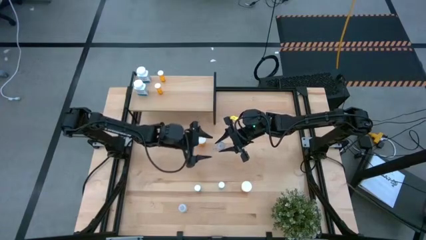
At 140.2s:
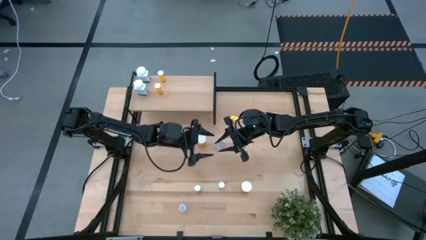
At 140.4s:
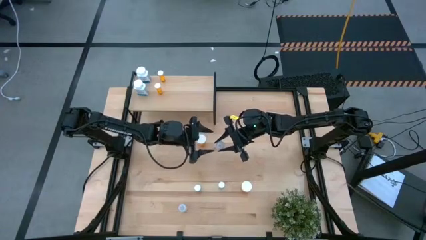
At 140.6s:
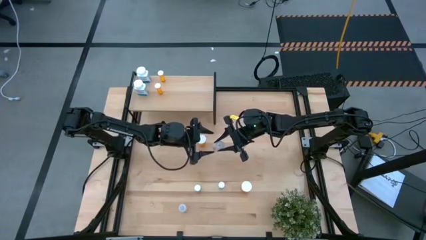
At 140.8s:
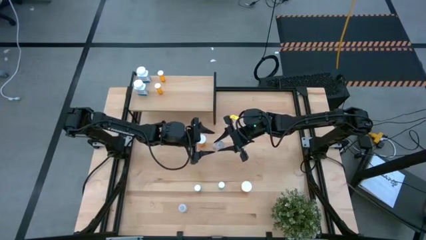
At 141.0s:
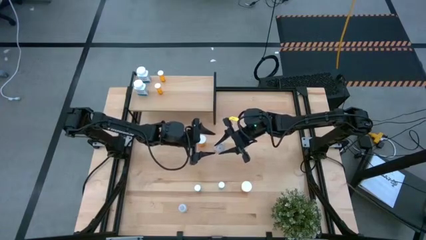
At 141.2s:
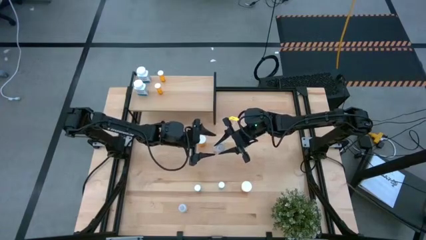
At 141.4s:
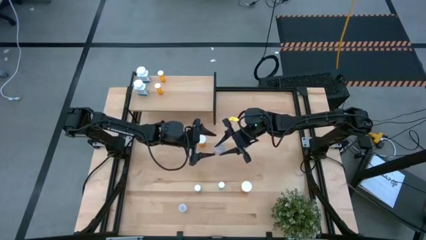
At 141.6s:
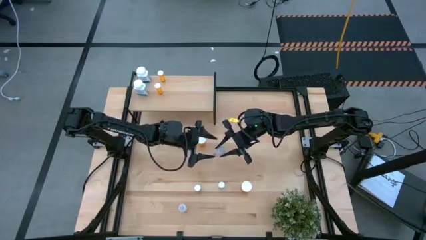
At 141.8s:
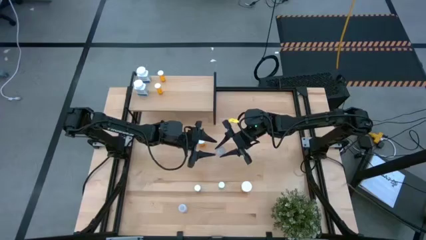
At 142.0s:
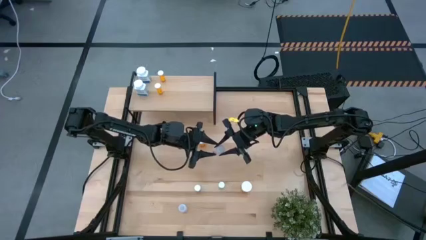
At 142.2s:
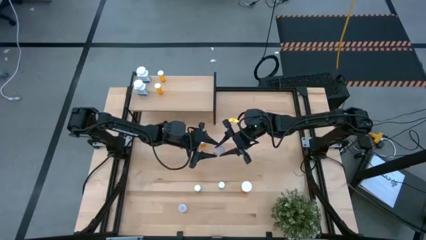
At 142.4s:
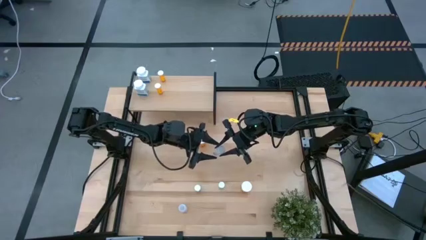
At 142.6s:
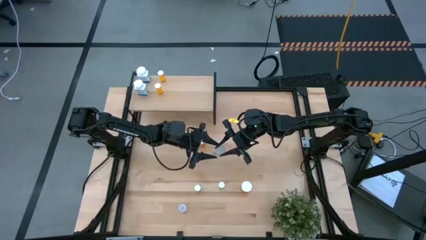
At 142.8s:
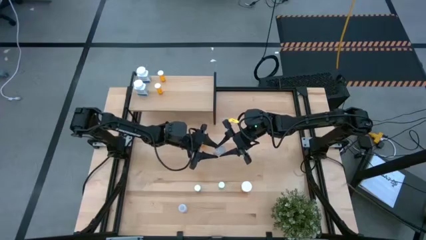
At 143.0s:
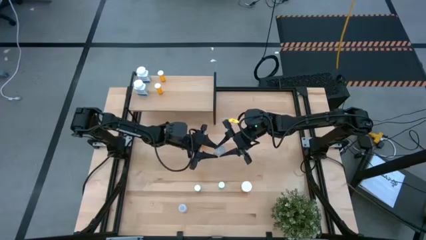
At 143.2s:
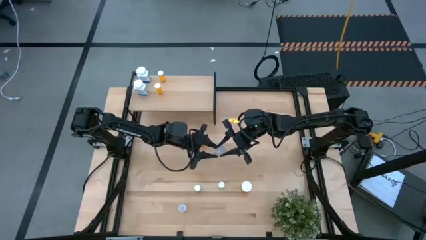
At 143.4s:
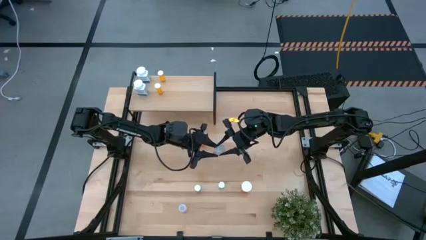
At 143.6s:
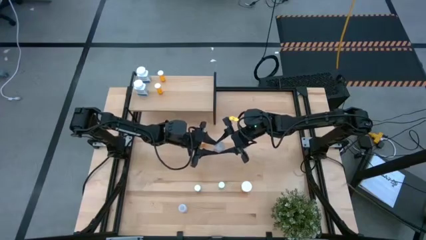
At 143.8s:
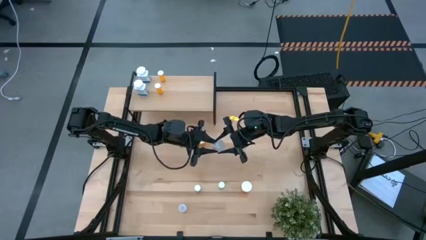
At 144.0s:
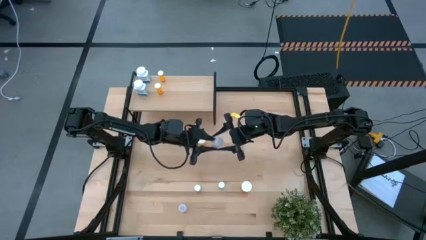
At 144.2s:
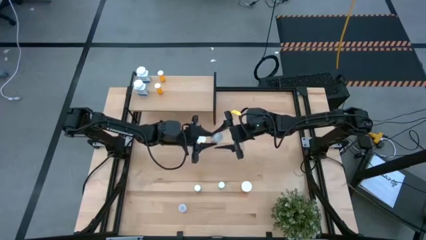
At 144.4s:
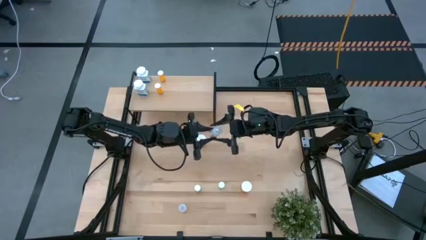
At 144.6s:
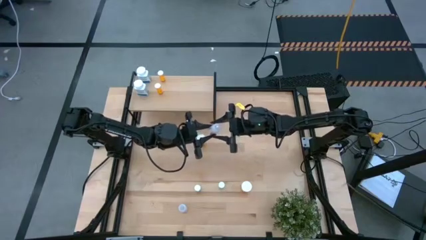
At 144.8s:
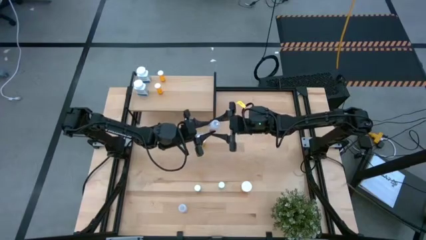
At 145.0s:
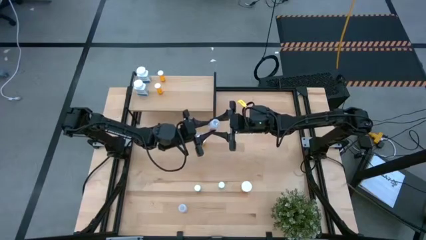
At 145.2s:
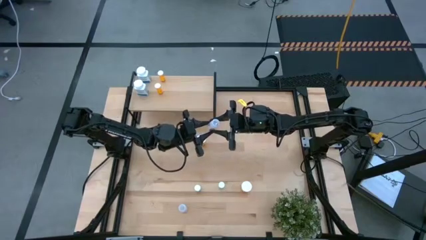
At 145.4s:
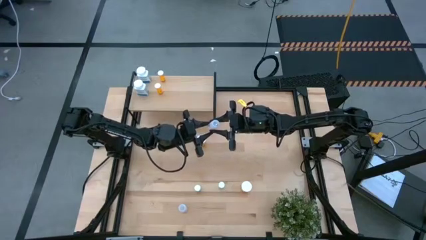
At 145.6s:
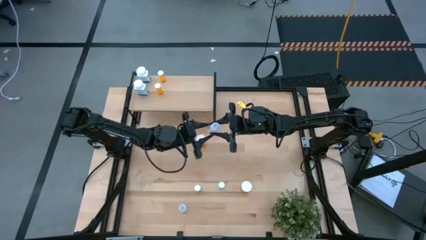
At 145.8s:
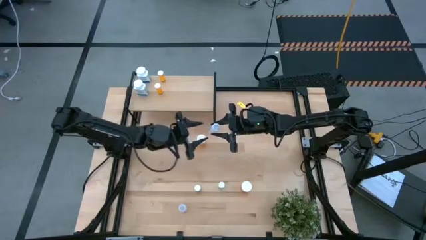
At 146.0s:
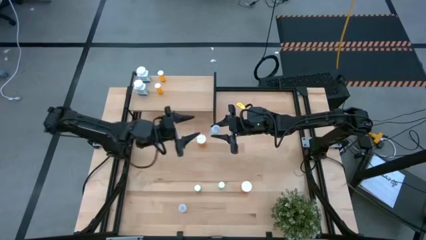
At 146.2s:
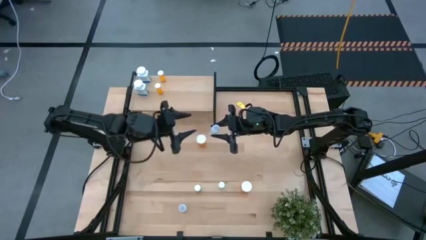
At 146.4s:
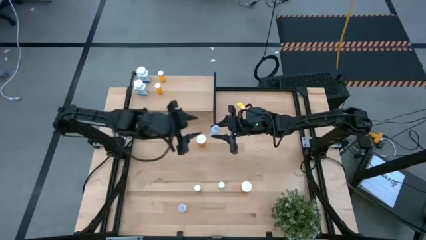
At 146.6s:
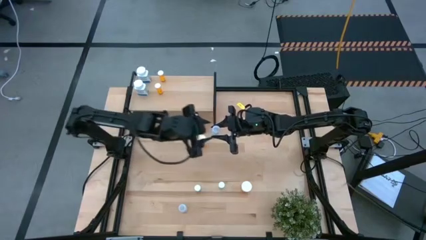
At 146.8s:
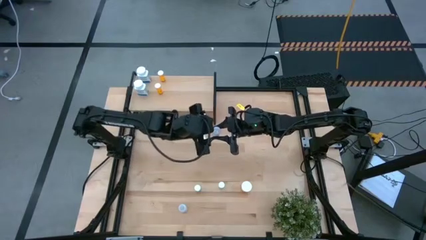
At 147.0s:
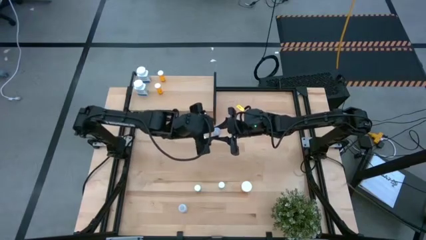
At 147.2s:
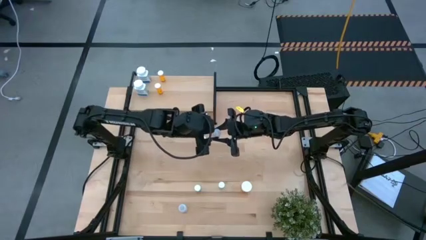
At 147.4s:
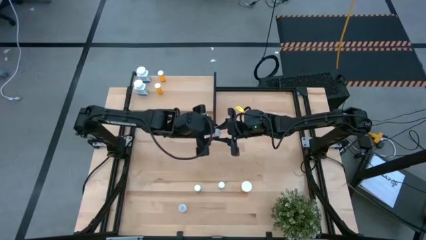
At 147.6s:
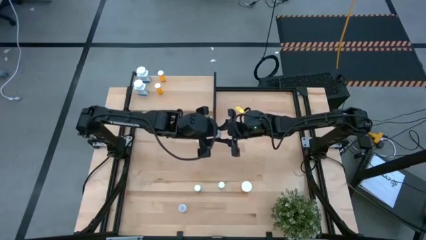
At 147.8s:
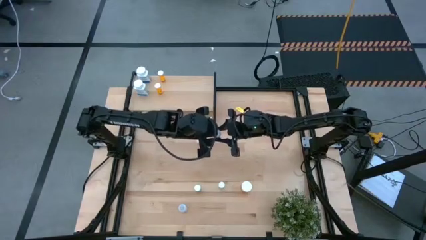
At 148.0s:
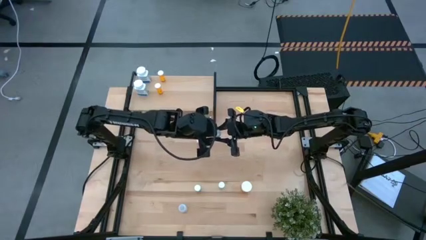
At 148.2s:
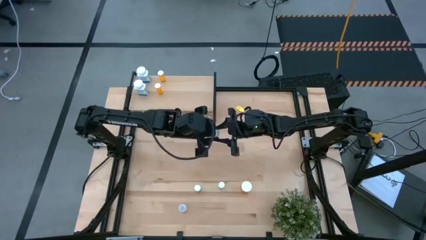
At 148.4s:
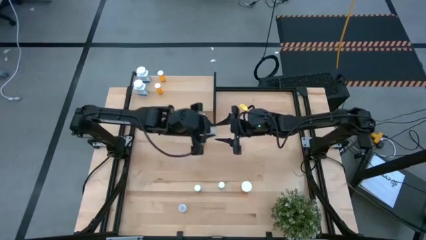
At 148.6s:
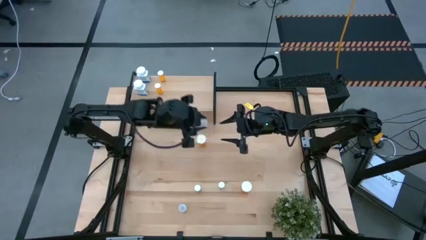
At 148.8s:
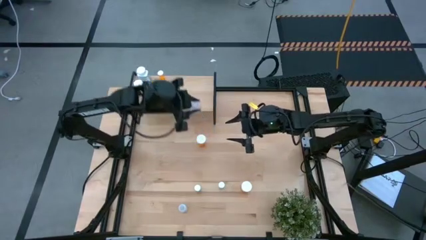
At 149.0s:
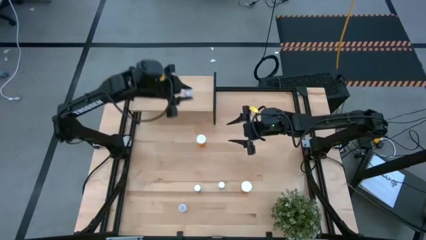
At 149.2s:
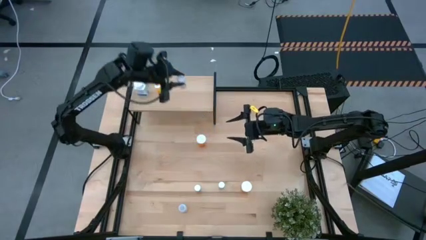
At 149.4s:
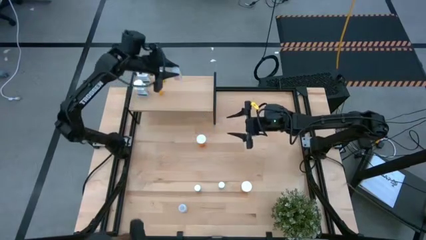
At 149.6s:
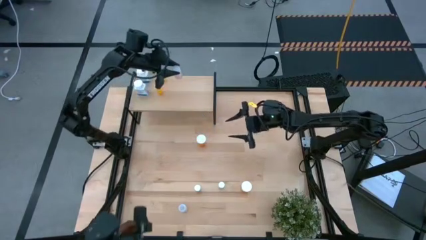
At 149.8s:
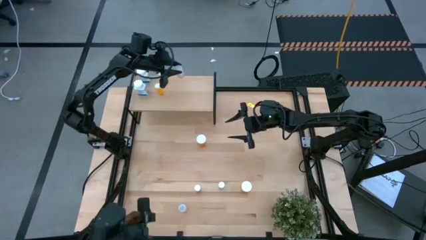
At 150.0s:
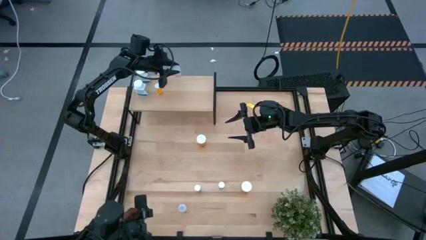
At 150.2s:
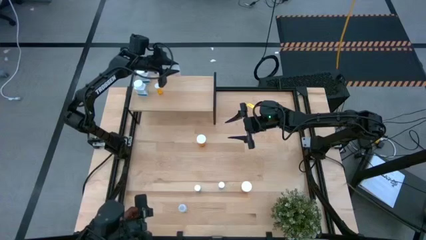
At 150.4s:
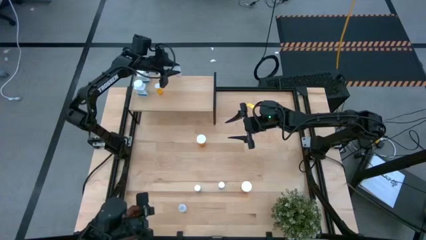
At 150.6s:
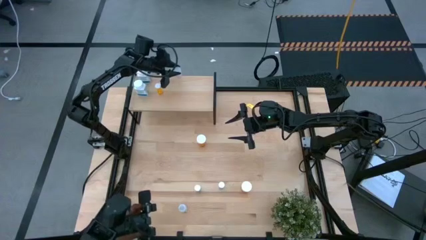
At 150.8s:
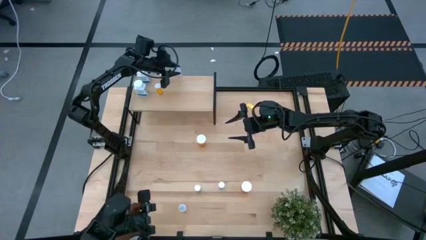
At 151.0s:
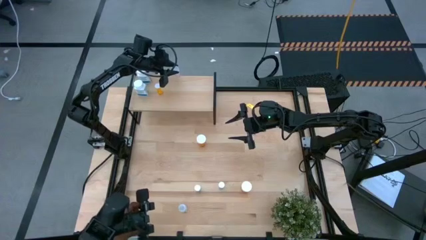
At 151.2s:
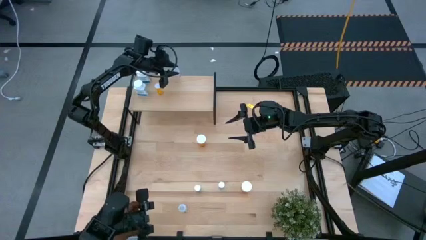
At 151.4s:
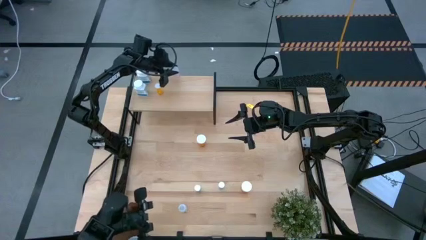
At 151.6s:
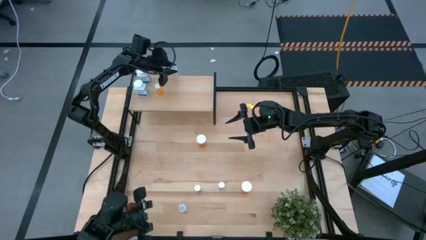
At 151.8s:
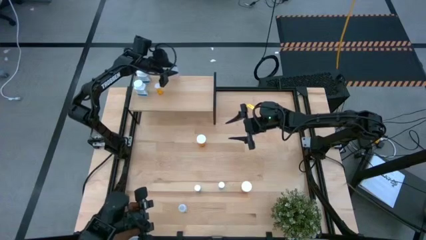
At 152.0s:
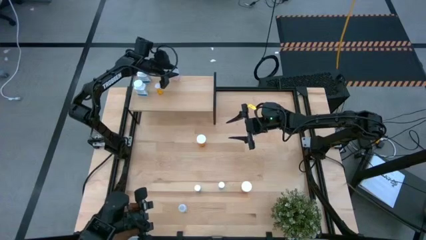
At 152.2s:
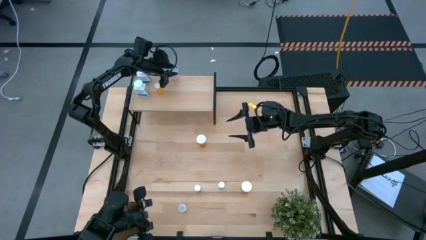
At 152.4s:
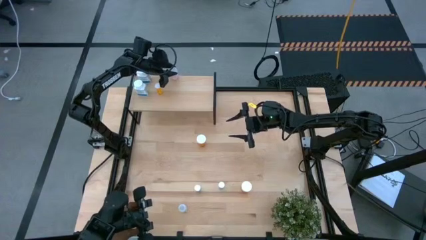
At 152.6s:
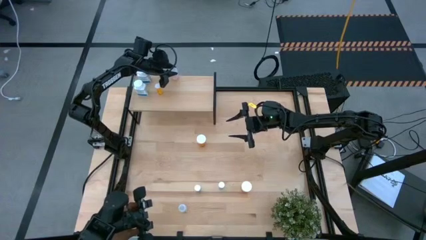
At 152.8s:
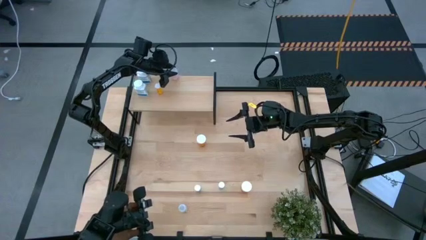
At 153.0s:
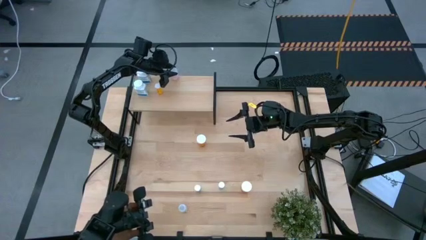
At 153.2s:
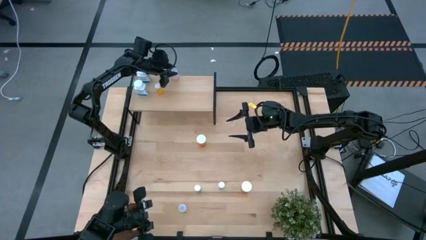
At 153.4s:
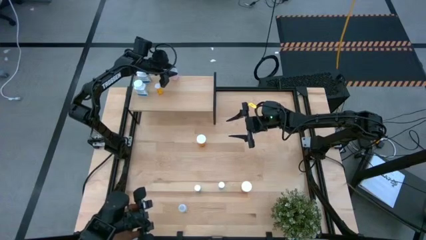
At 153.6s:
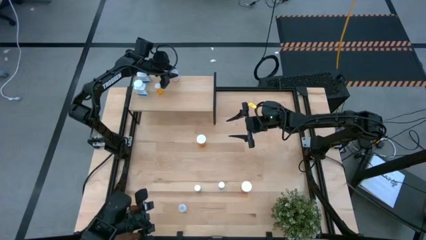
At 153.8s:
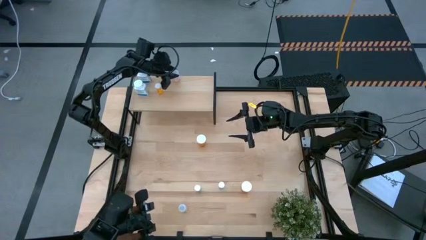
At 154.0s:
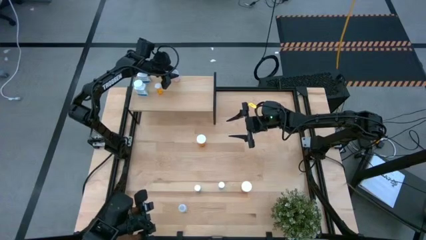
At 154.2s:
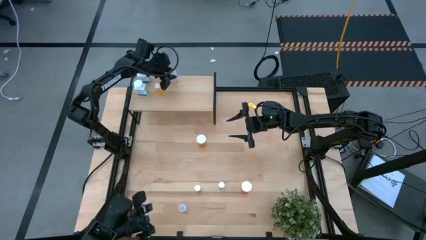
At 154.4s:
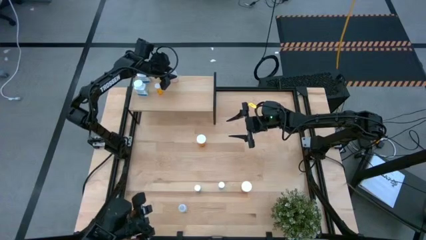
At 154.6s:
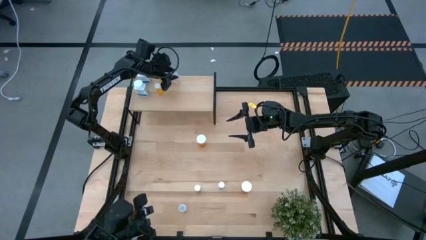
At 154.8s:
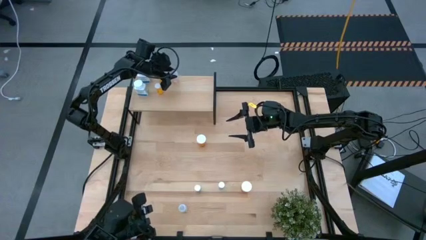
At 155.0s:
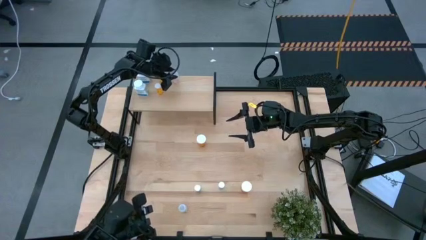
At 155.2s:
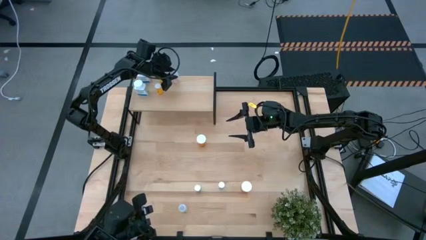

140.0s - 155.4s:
Task: Pick and place medicine bottles onto shelf by color
Put the top transparent pill bottle on the shelf
